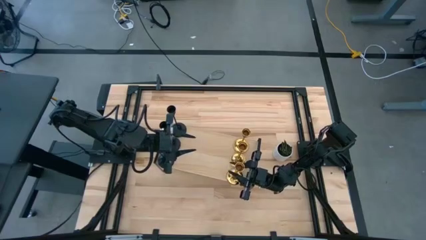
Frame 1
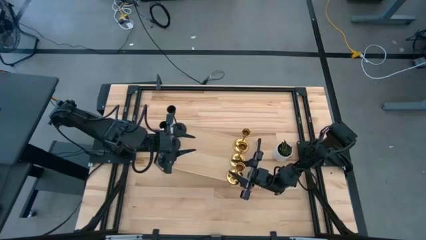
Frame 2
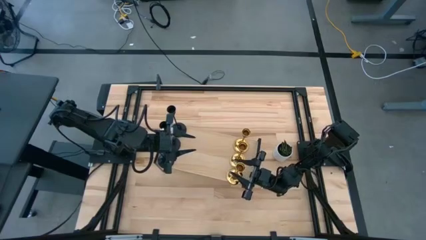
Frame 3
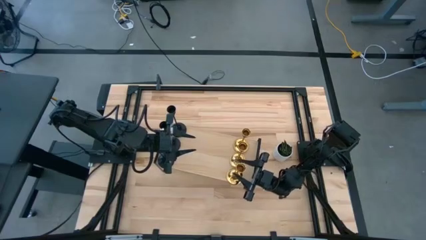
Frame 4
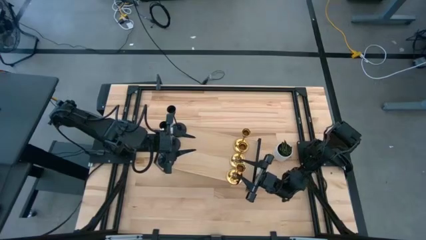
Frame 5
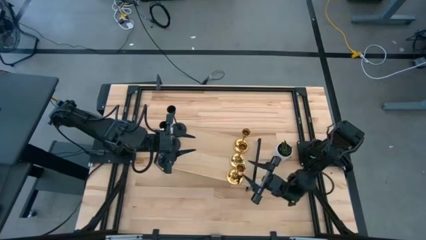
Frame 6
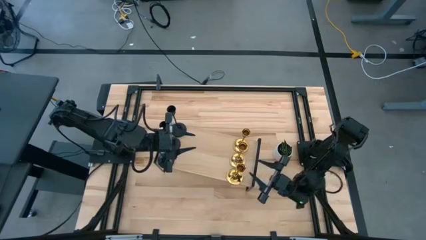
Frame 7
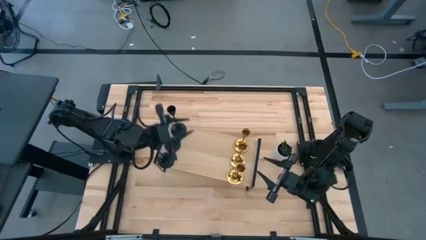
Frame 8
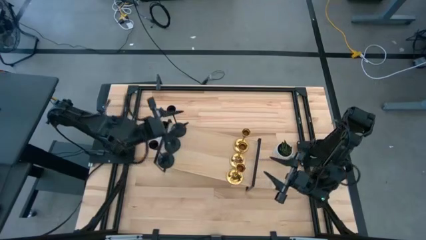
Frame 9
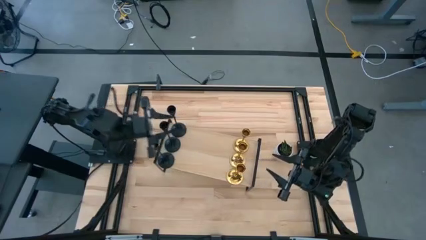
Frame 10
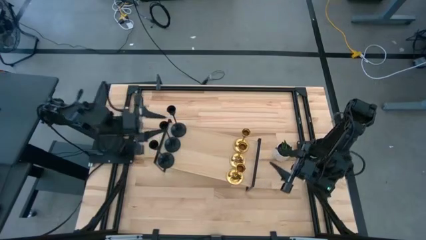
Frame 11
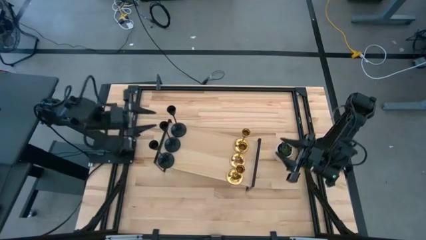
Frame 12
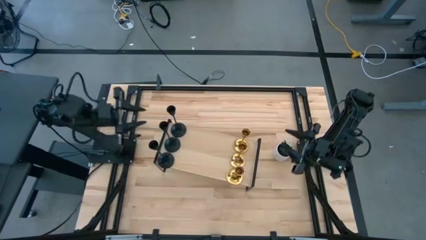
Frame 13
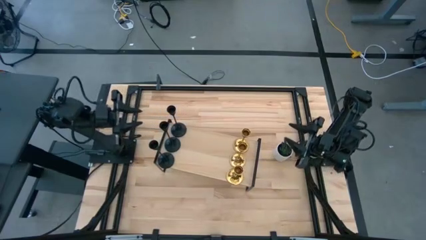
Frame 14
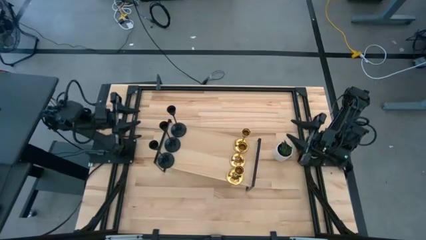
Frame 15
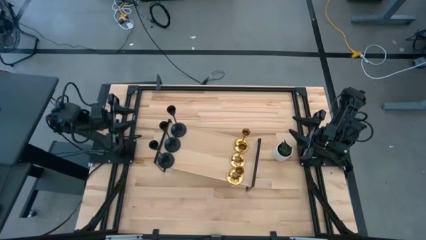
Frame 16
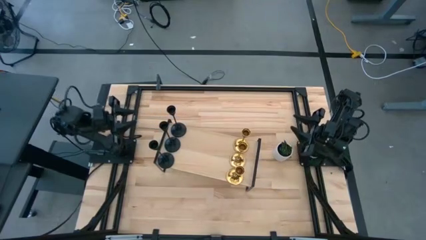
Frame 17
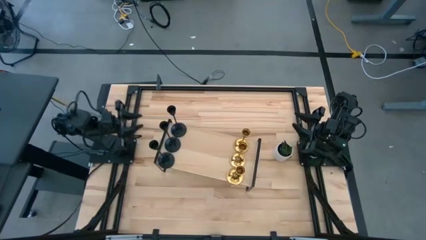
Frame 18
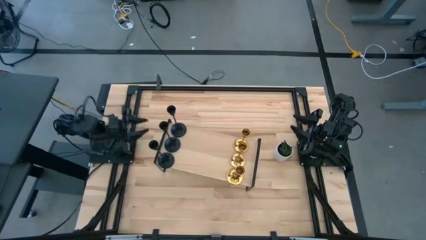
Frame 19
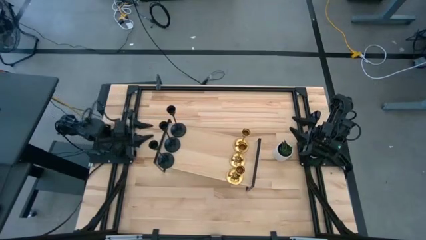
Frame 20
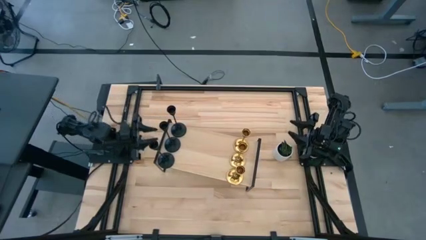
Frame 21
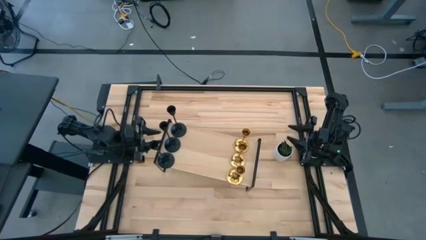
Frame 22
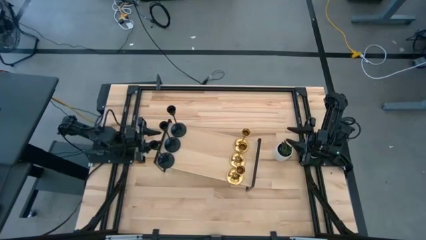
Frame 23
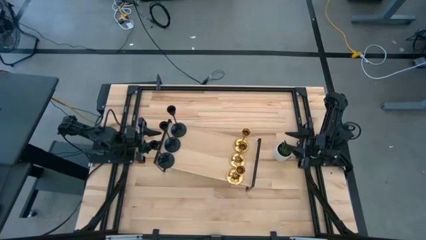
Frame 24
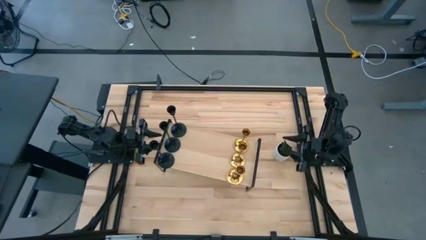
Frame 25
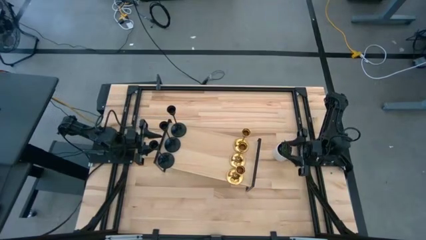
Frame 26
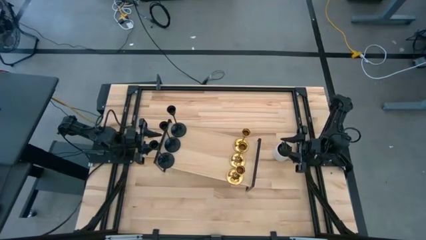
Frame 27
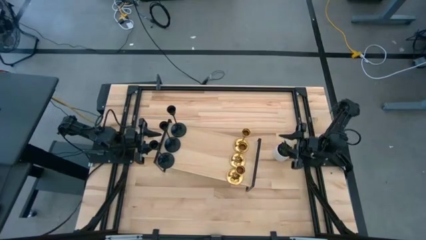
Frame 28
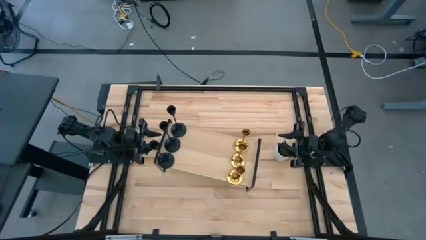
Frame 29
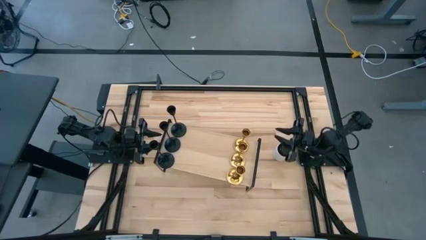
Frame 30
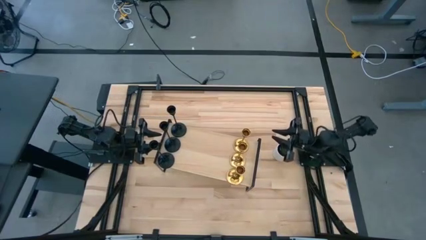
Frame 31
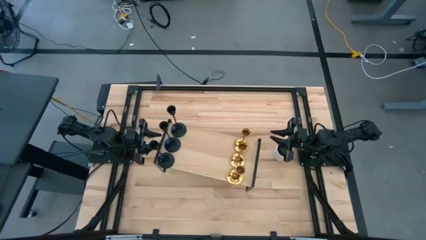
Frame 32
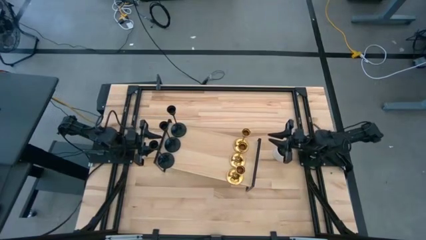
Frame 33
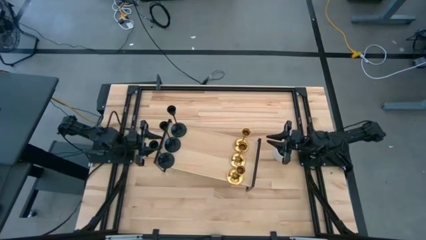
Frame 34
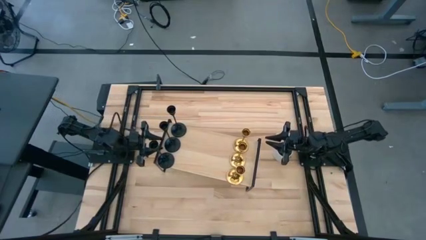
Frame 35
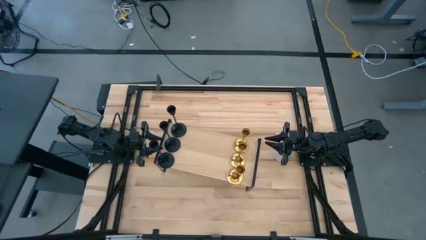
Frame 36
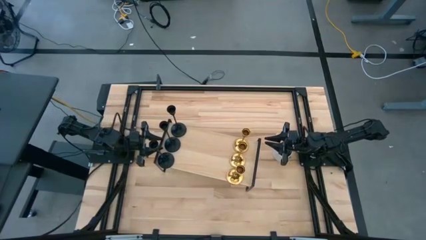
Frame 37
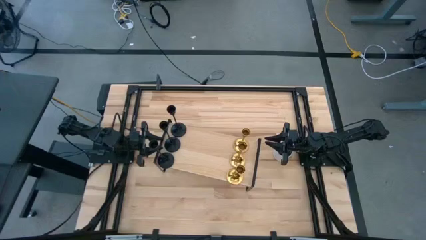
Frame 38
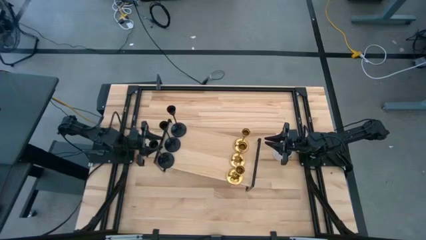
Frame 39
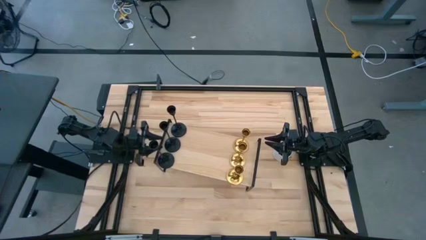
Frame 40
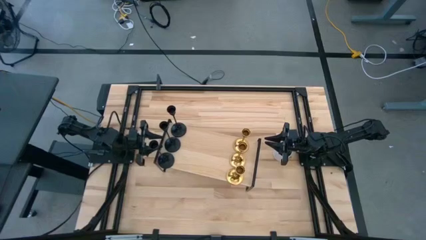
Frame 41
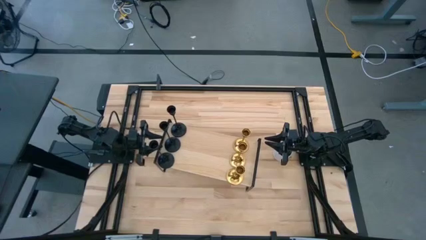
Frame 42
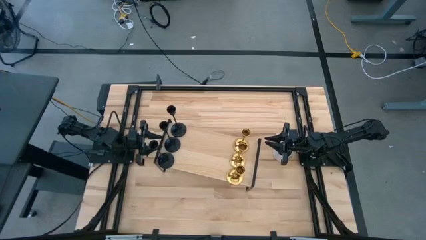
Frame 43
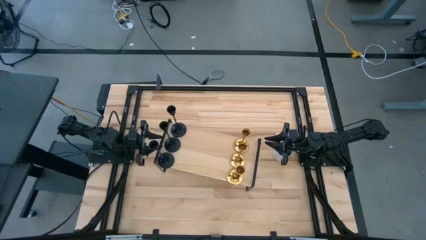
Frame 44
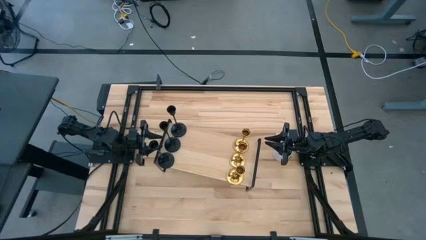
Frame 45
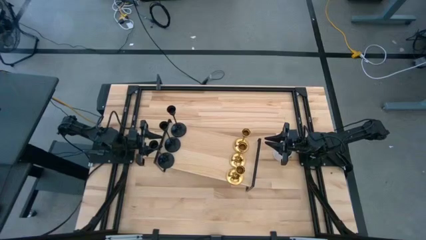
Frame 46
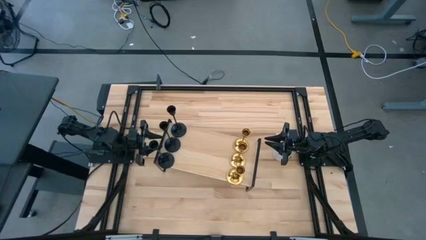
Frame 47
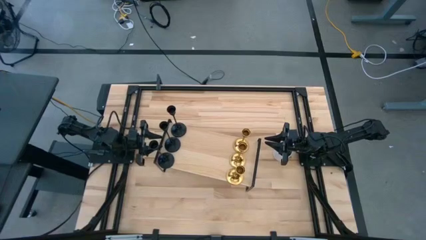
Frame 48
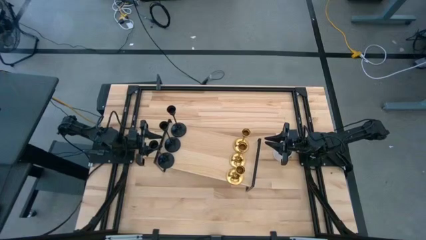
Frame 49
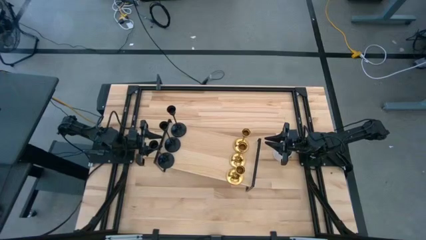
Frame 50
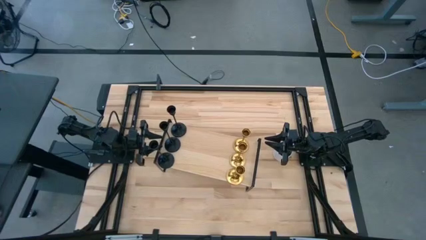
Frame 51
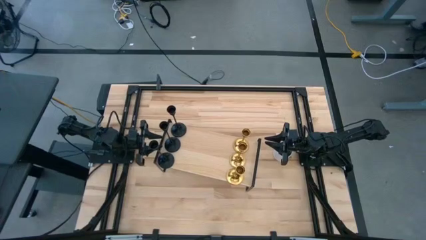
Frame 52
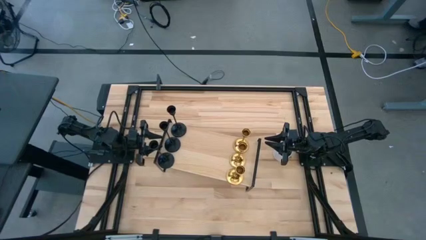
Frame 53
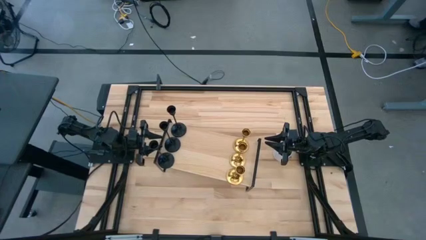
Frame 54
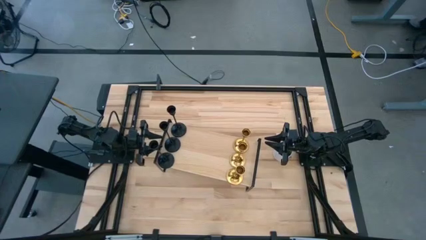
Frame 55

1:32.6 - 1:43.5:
Task: Pick & Place candle stick holders
Return to Home Position

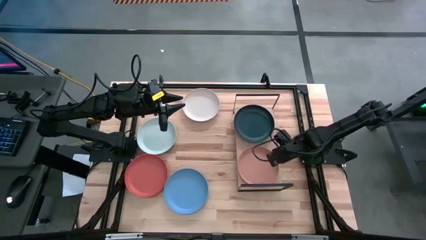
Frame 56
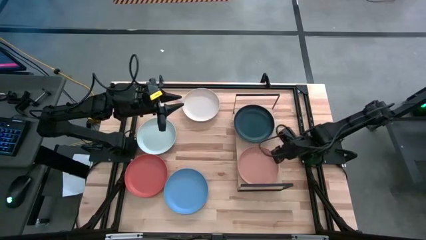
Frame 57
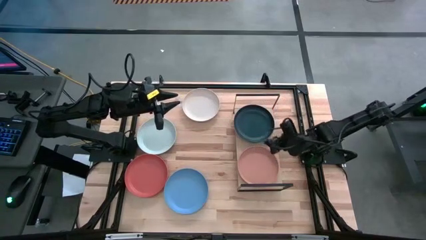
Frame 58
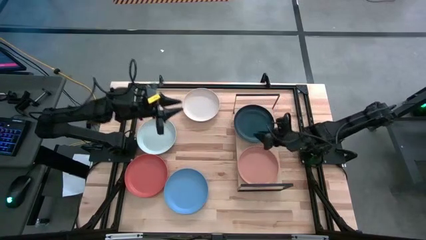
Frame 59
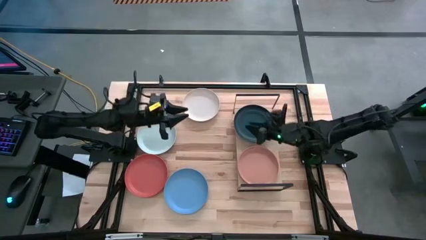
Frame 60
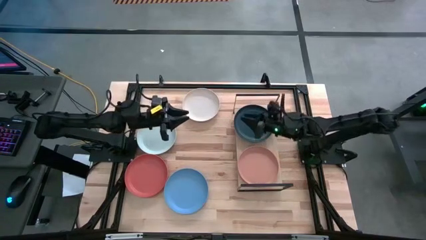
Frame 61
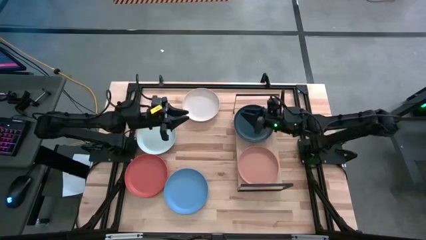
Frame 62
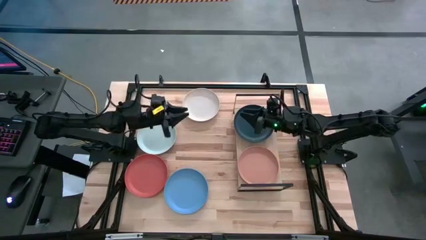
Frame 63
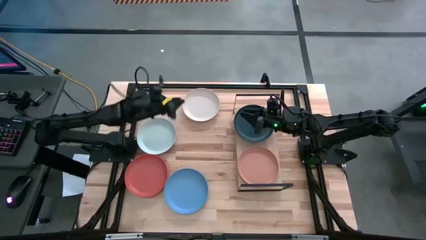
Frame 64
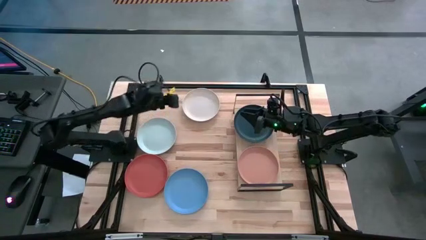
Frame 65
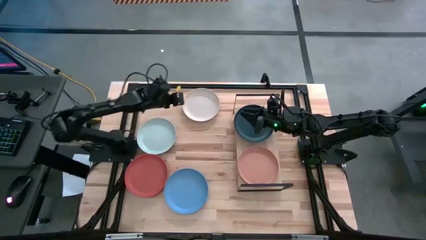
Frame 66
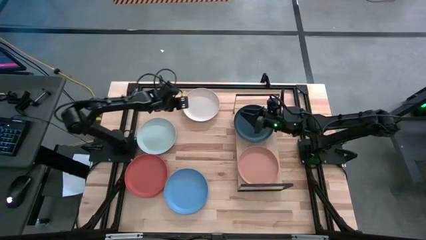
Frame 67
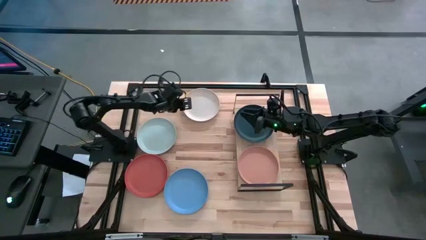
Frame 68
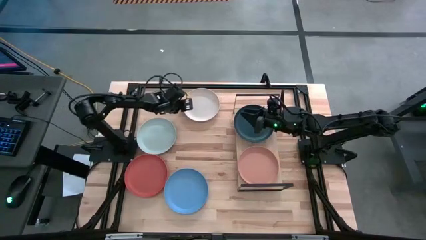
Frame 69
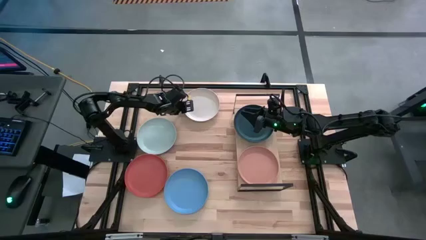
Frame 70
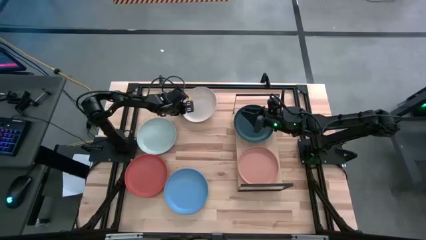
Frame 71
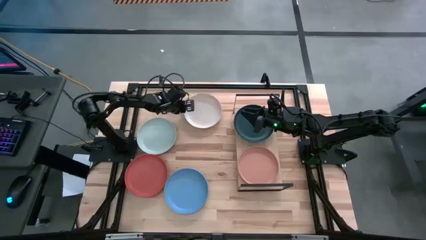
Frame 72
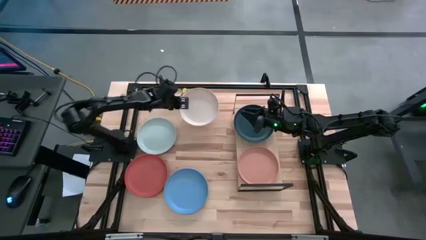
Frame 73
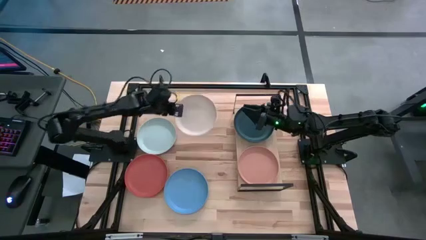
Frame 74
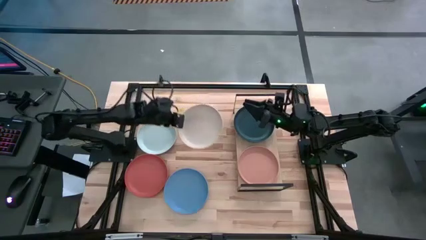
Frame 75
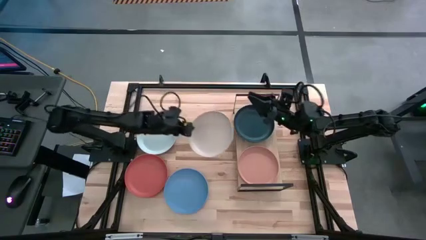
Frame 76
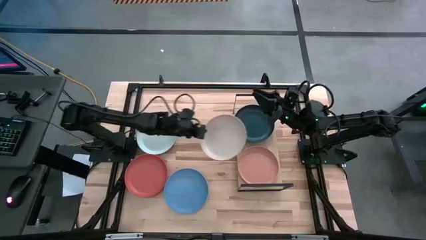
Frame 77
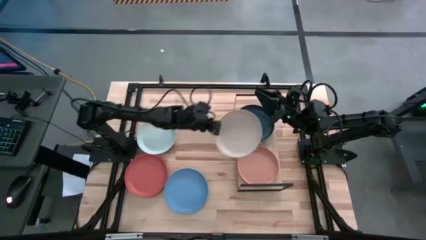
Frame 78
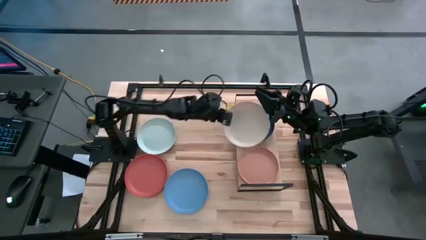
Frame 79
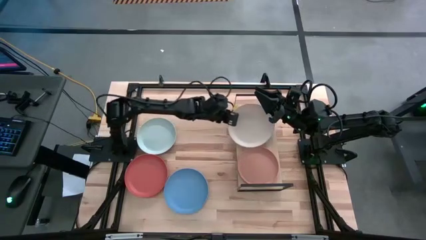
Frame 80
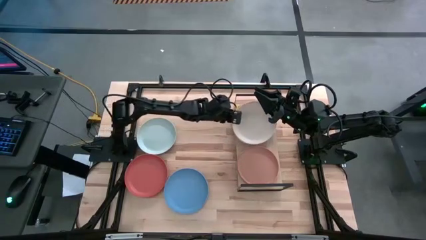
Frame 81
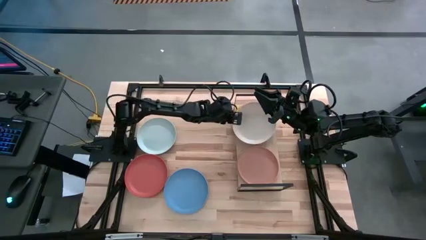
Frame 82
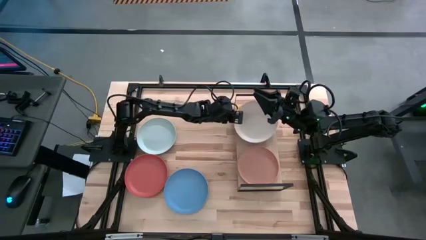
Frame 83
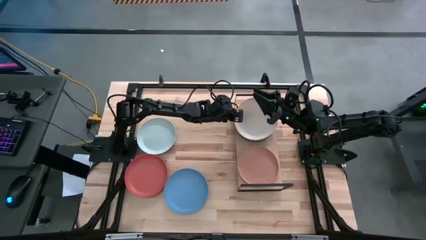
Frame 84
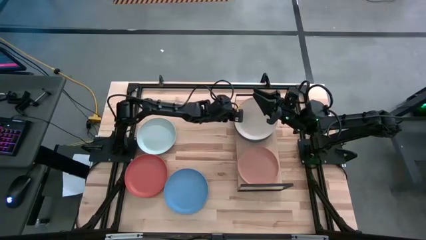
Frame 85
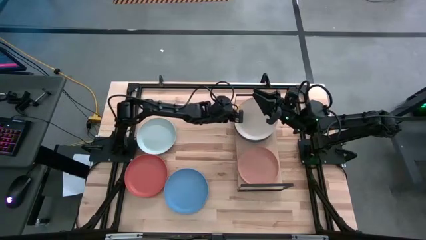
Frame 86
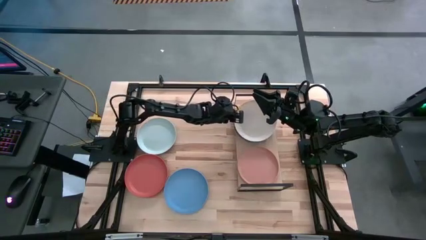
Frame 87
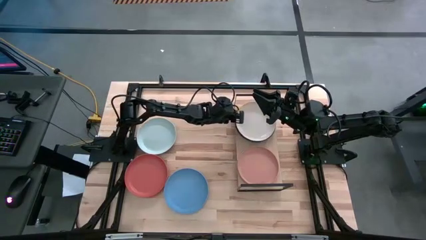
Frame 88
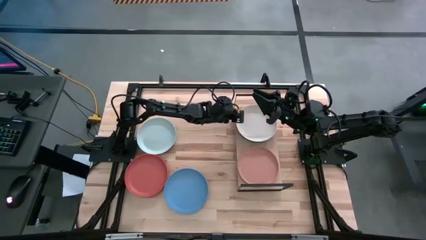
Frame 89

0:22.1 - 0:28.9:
Task: Place and stack plates onto a shelf
Stack the white plate on top of the black plate on the shelf
